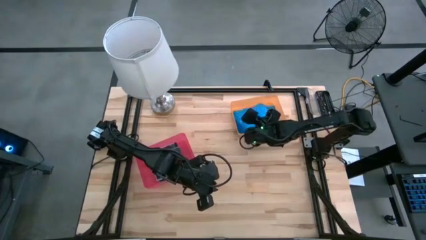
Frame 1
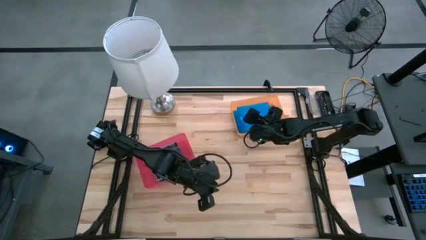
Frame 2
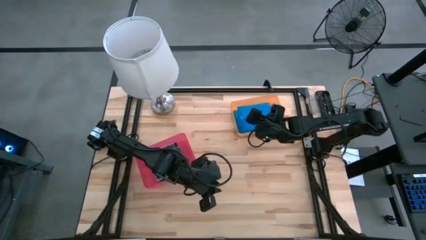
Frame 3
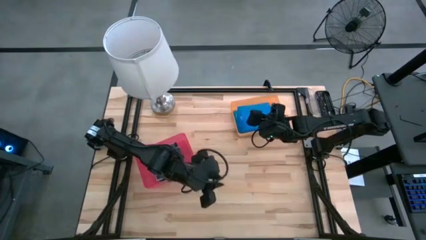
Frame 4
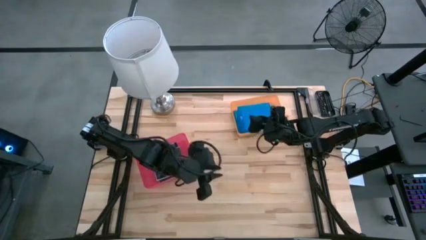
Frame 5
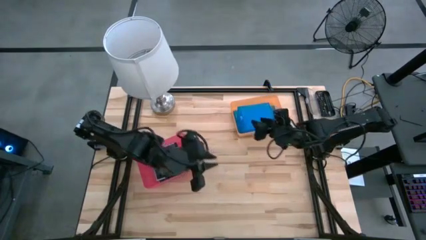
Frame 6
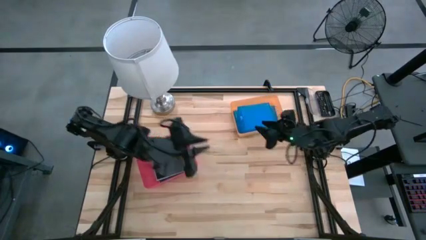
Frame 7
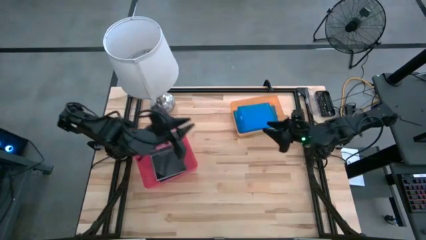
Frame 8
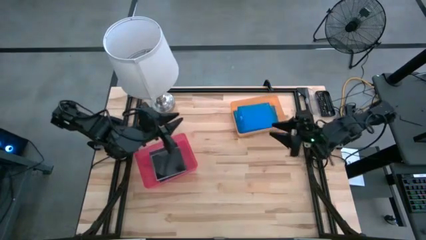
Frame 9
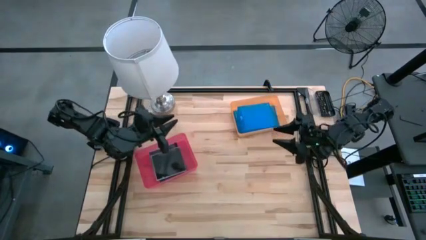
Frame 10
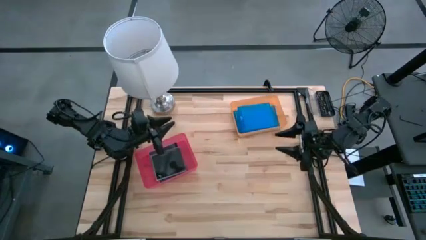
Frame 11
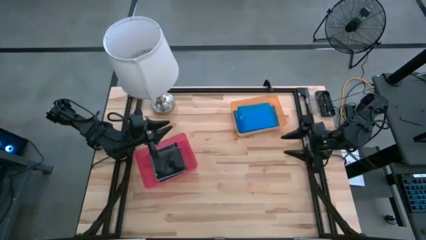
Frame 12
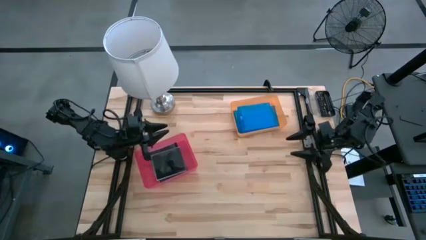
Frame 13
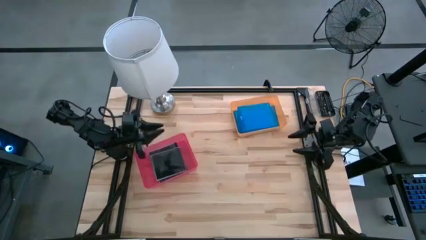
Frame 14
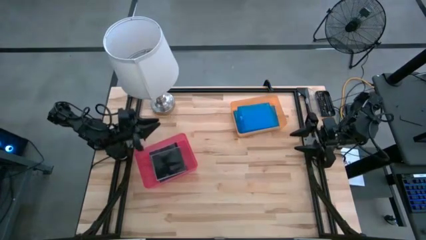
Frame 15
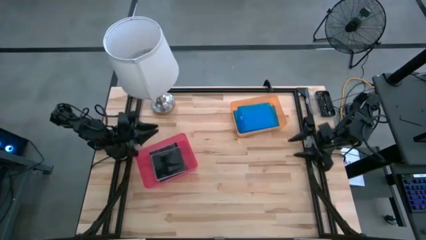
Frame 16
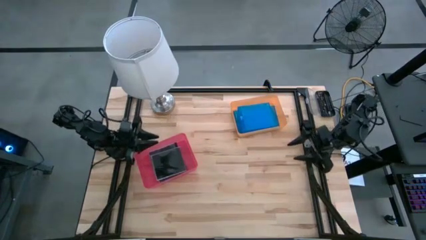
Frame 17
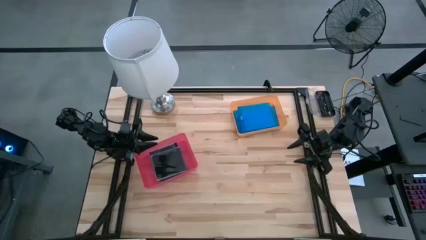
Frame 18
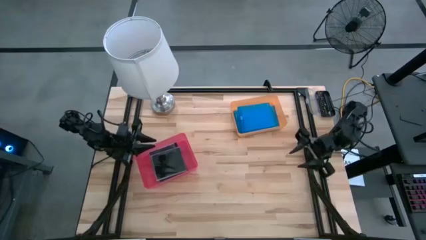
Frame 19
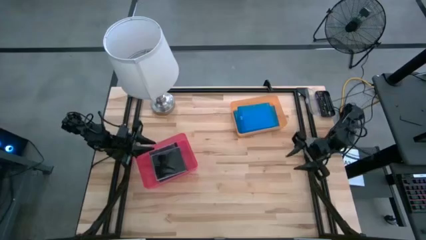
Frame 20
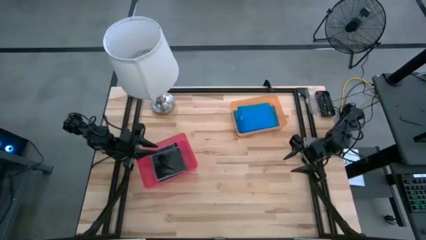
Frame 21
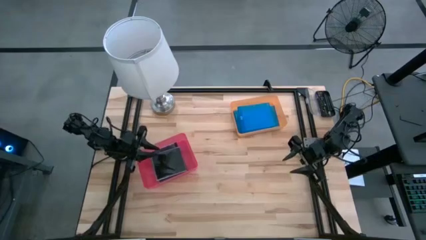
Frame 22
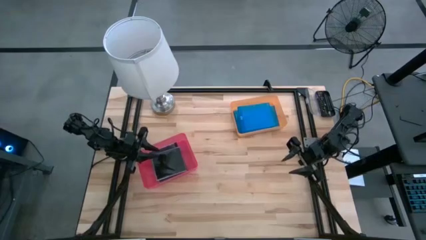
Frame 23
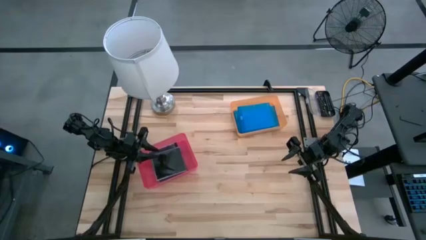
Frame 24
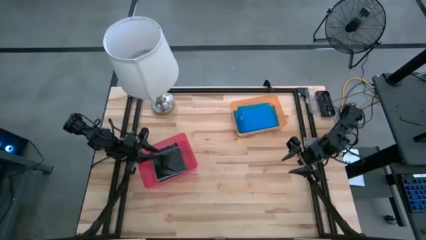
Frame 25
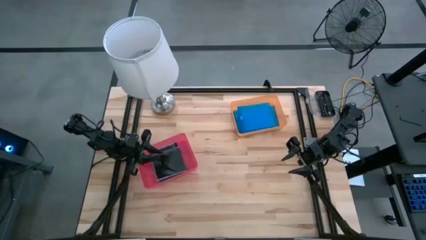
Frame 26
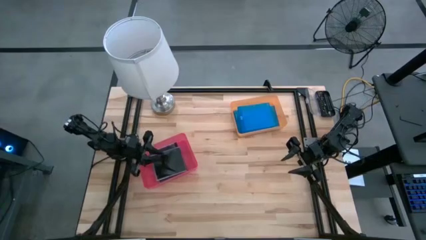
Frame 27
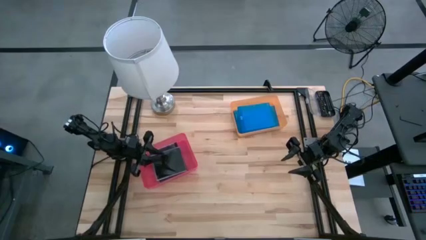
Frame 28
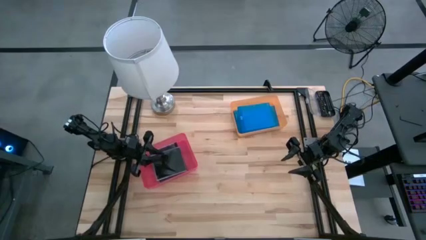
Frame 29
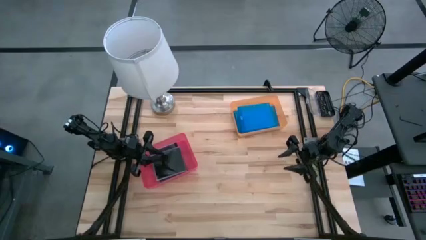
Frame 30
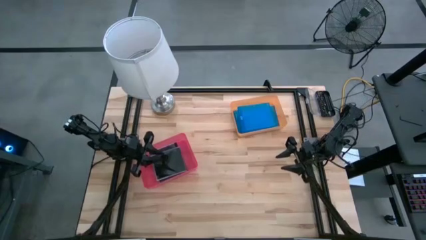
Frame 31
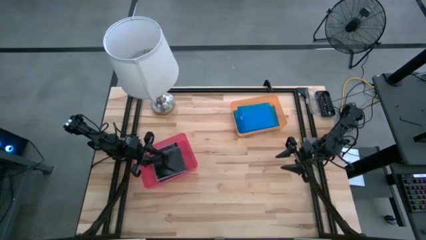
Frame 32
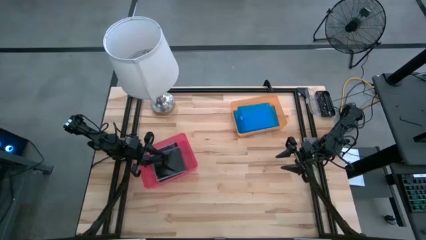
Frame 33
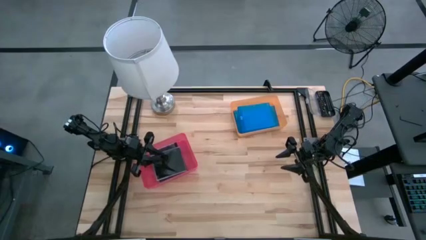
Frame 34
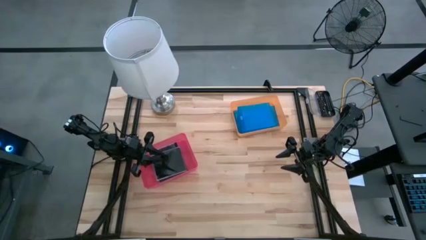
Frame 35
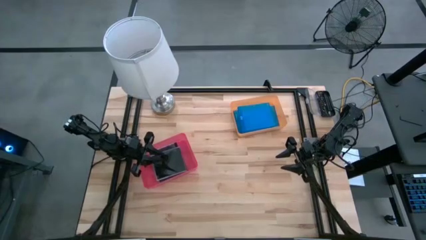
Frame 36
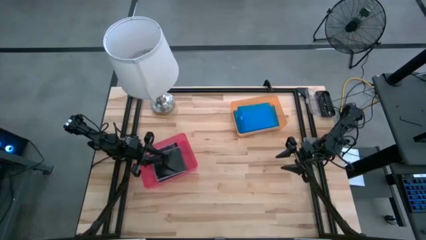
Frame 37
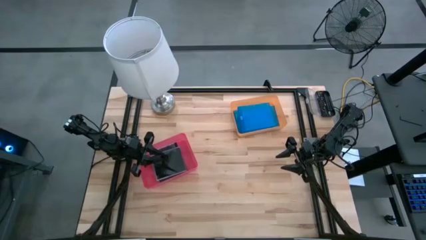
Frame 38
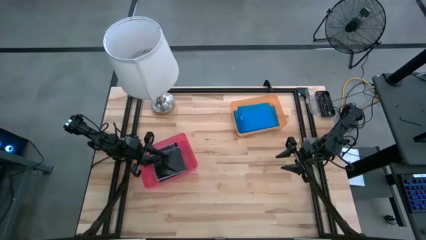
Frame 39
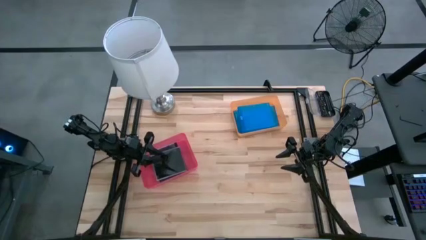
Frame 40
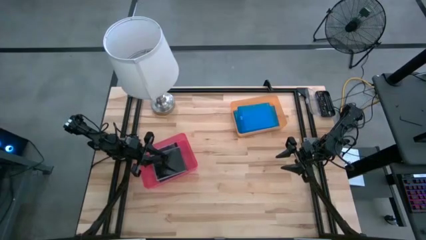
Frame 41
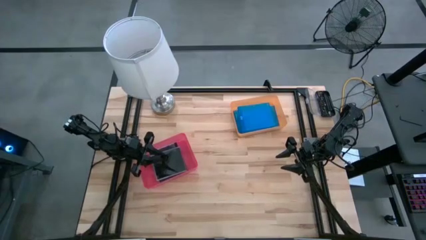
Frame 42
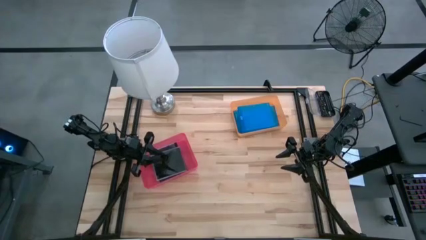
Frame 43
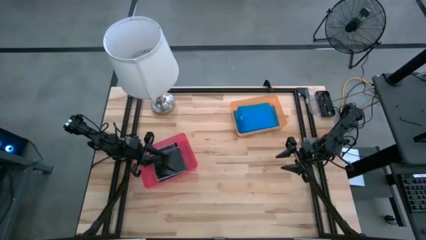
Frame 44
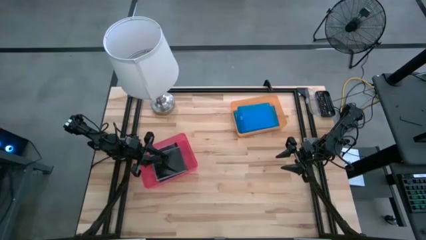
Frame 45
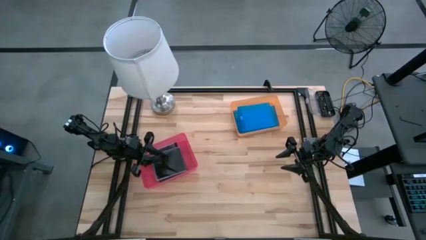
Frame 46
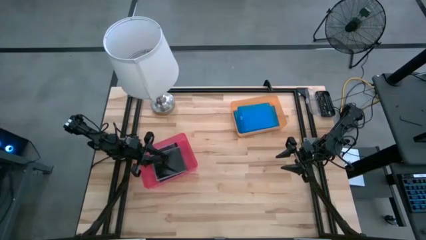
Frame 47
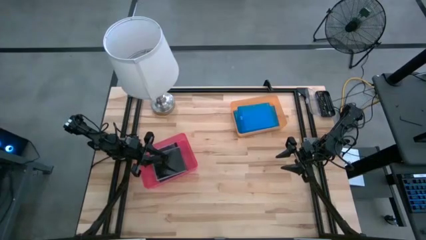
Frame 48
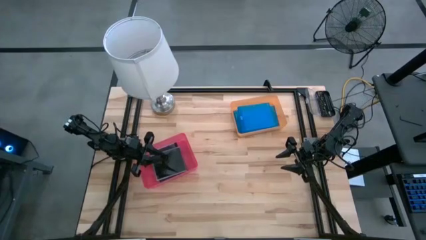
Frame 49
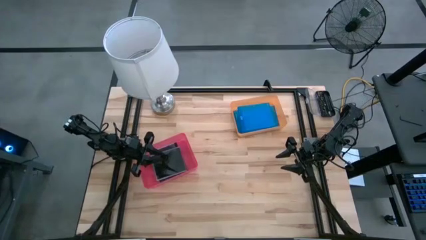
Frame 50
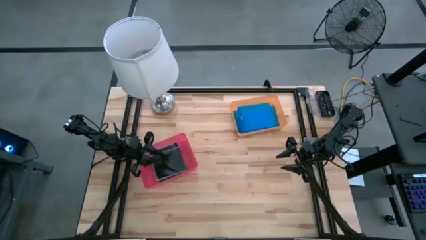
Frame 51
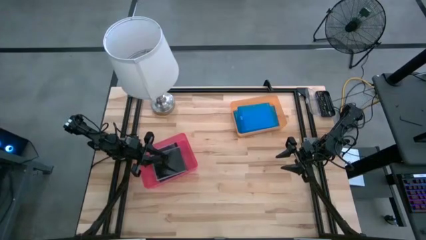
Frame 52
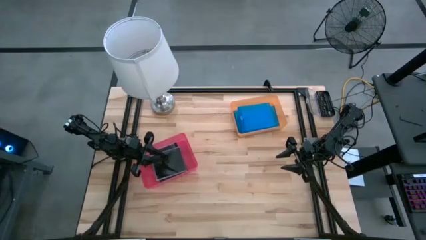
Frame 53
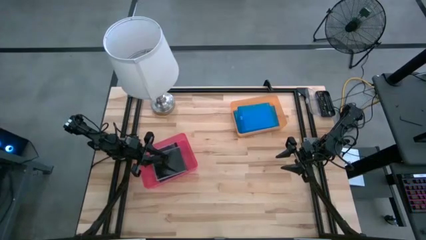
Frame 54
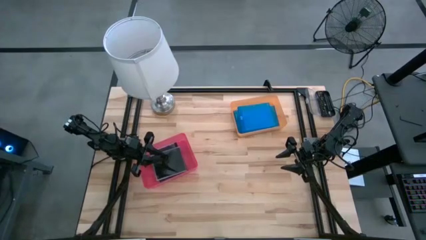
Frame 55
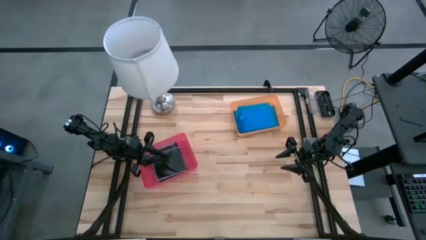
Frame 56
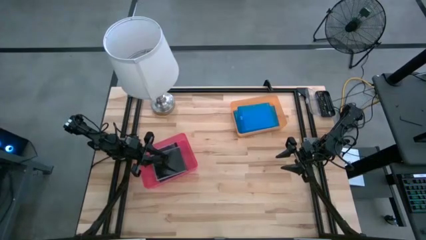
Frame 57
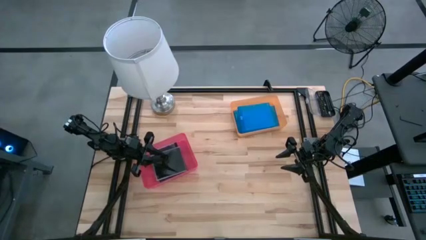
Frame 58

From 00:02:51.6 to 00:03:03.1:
Task: Pick & place jewel cases by type
Return to Home Position
